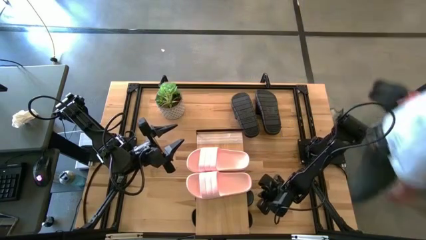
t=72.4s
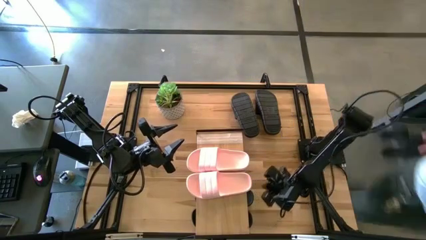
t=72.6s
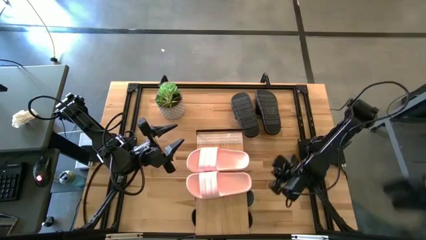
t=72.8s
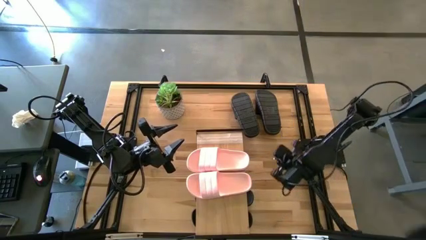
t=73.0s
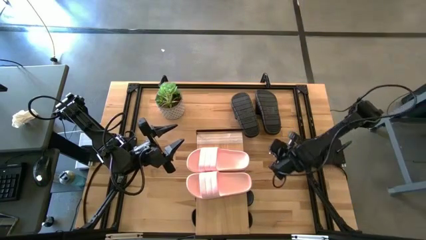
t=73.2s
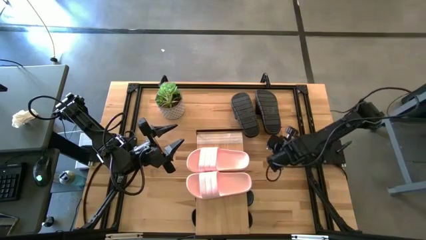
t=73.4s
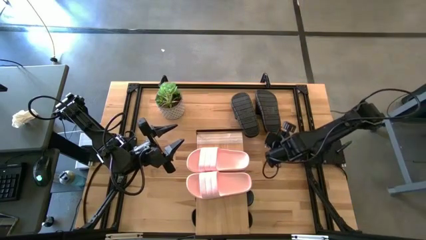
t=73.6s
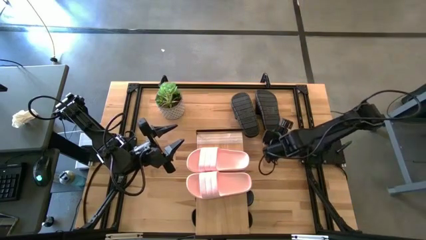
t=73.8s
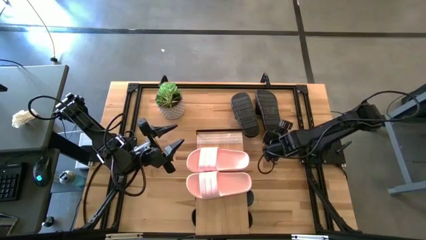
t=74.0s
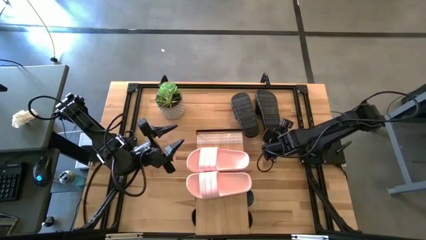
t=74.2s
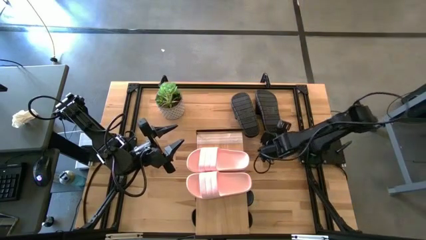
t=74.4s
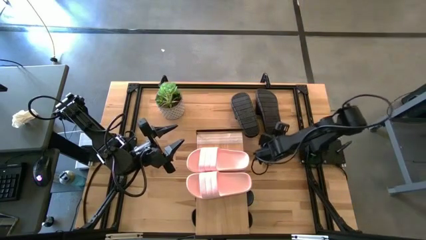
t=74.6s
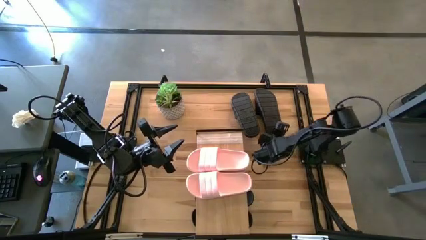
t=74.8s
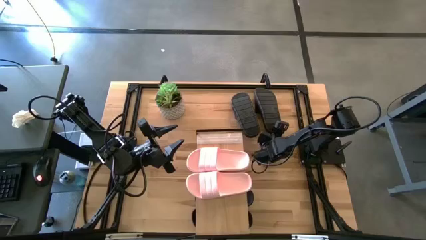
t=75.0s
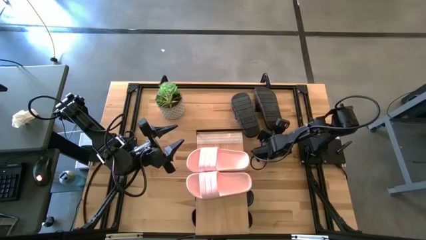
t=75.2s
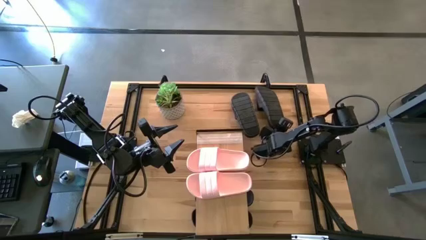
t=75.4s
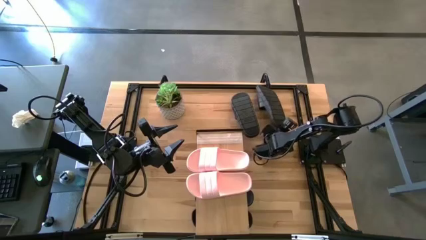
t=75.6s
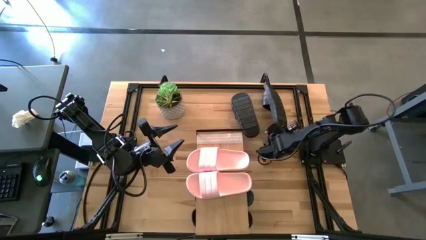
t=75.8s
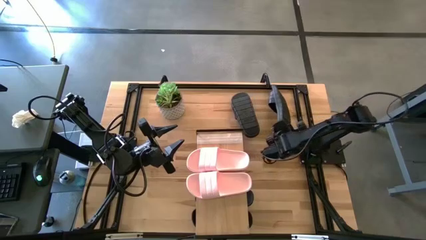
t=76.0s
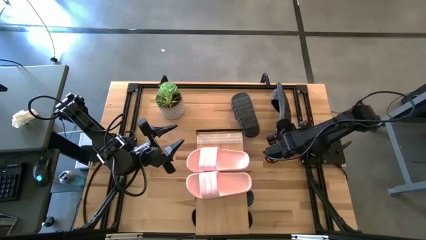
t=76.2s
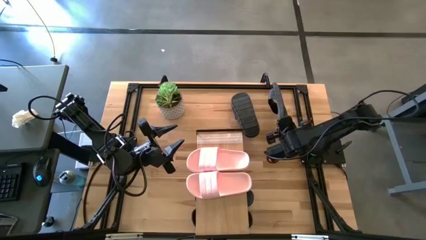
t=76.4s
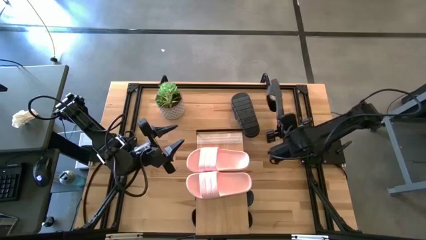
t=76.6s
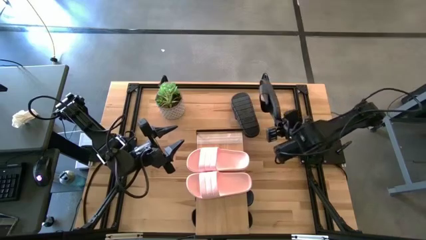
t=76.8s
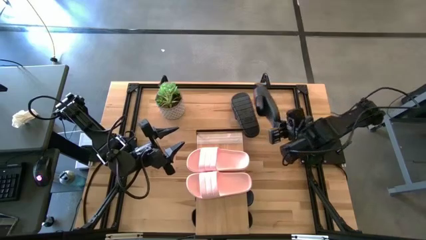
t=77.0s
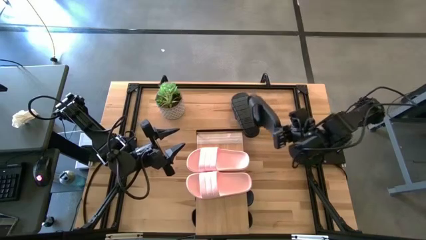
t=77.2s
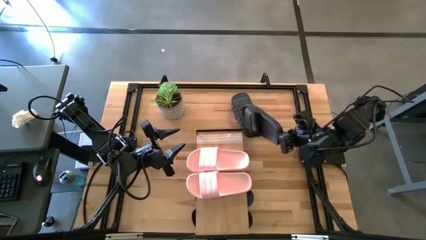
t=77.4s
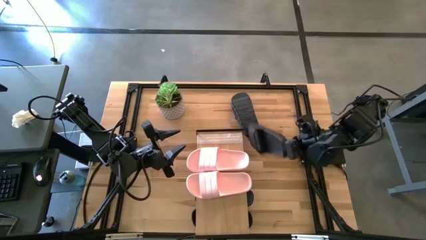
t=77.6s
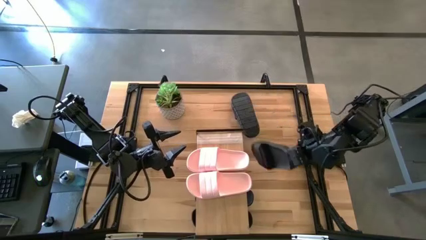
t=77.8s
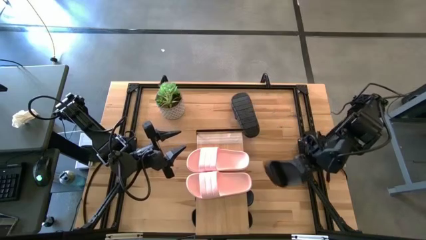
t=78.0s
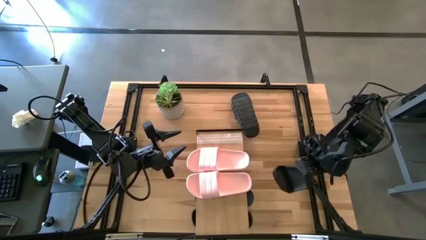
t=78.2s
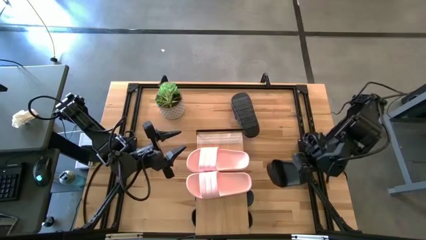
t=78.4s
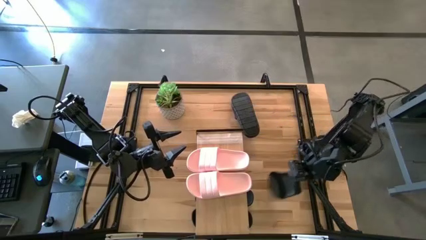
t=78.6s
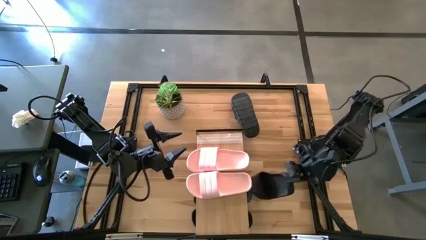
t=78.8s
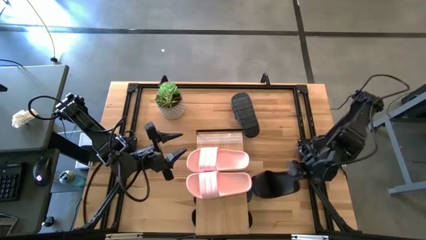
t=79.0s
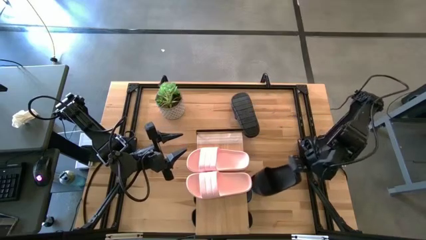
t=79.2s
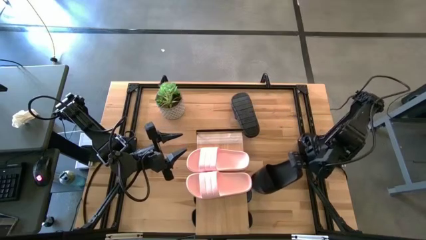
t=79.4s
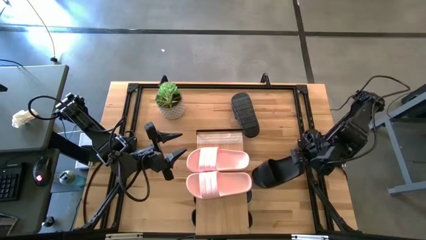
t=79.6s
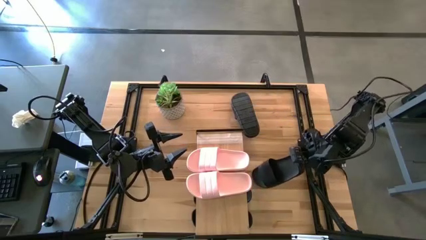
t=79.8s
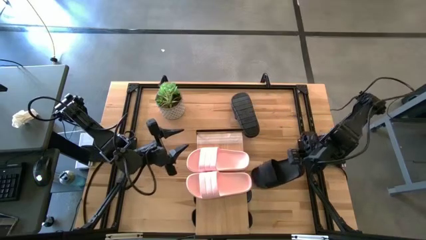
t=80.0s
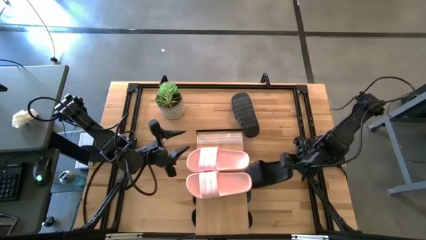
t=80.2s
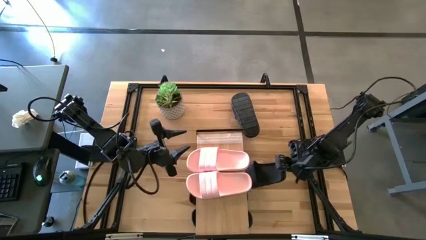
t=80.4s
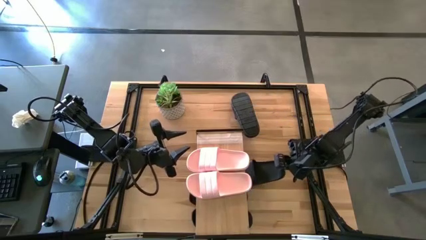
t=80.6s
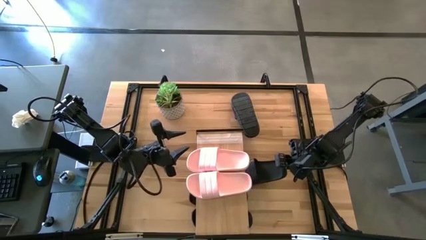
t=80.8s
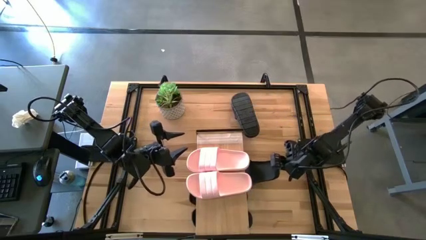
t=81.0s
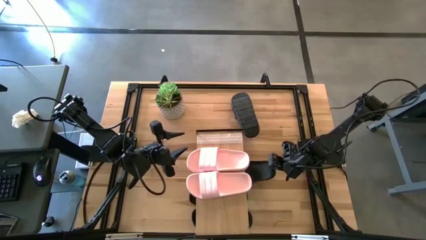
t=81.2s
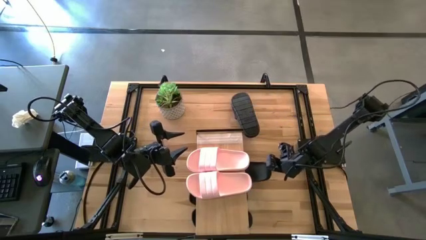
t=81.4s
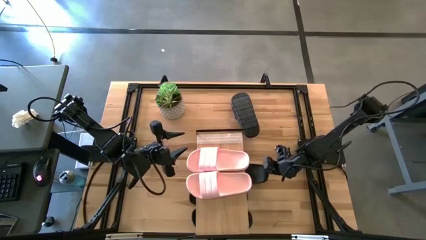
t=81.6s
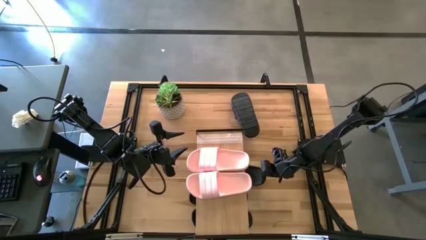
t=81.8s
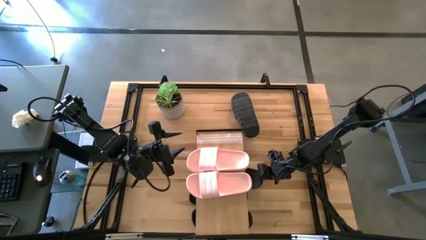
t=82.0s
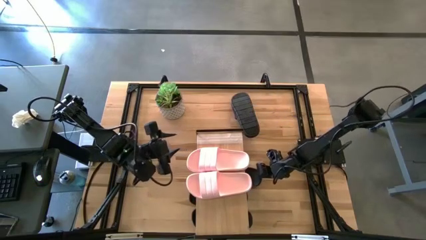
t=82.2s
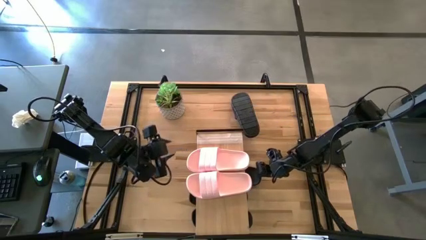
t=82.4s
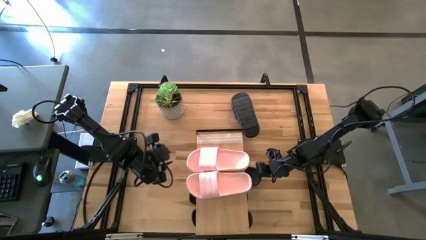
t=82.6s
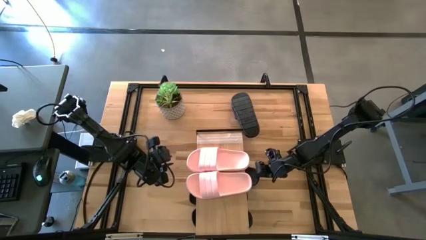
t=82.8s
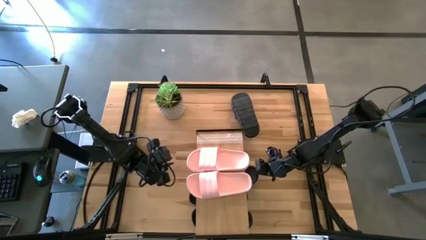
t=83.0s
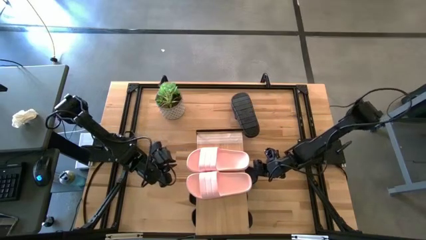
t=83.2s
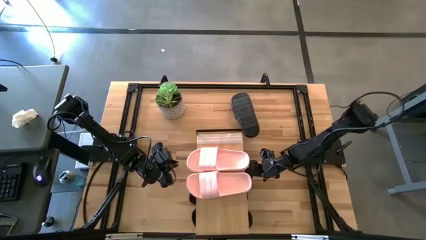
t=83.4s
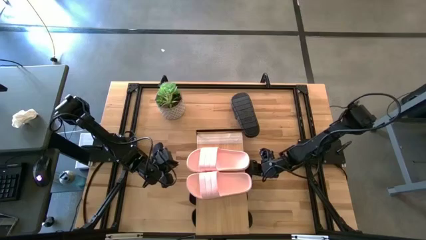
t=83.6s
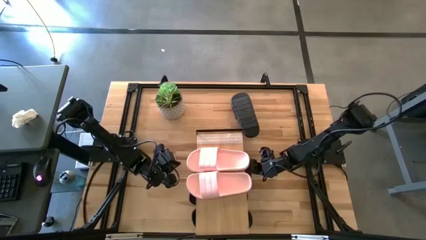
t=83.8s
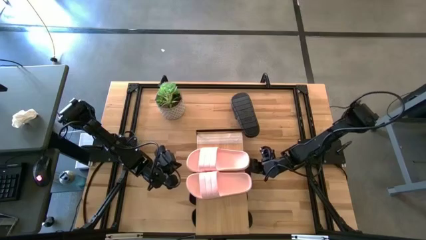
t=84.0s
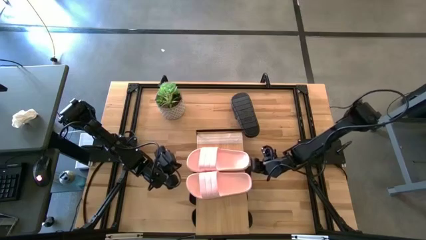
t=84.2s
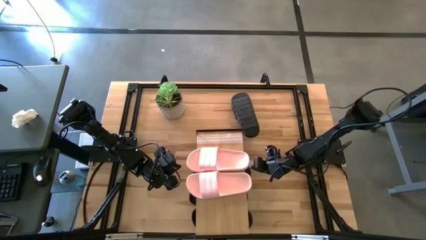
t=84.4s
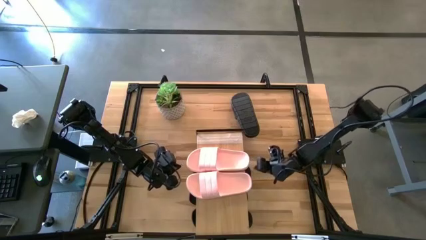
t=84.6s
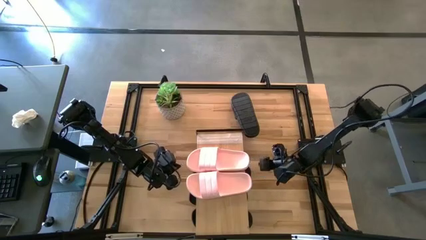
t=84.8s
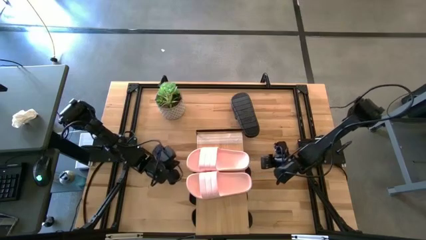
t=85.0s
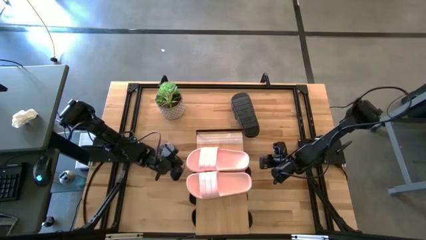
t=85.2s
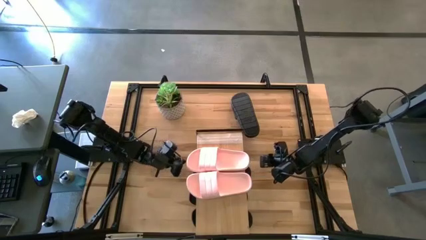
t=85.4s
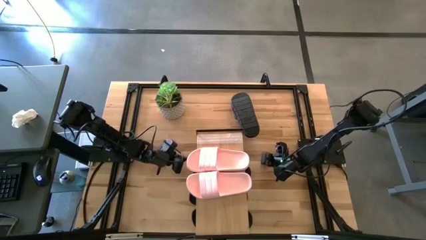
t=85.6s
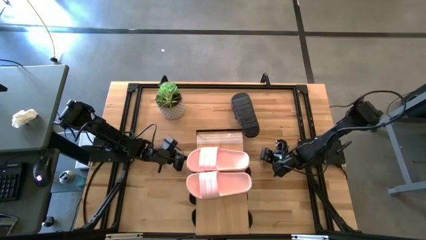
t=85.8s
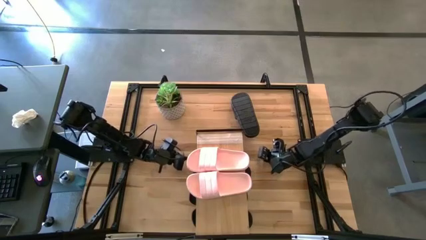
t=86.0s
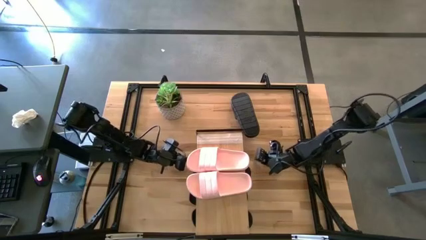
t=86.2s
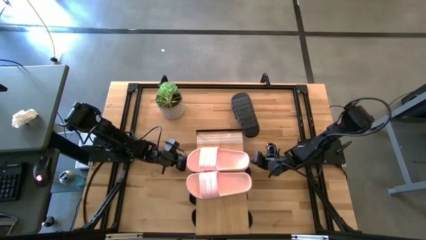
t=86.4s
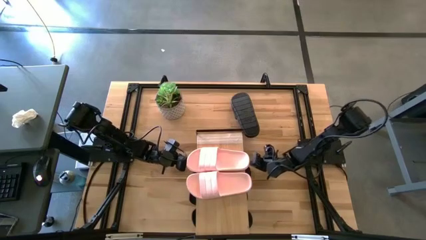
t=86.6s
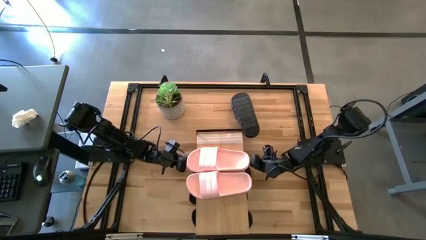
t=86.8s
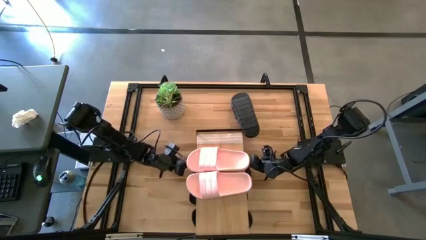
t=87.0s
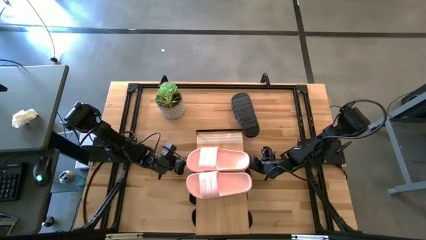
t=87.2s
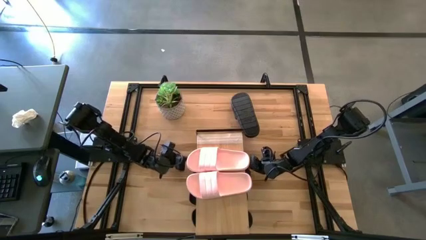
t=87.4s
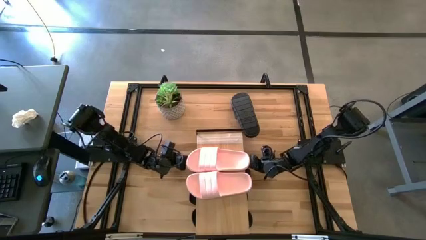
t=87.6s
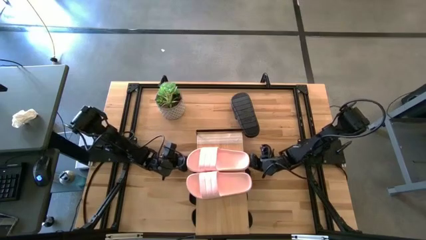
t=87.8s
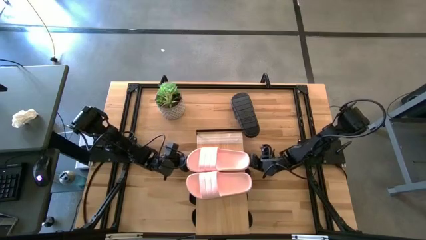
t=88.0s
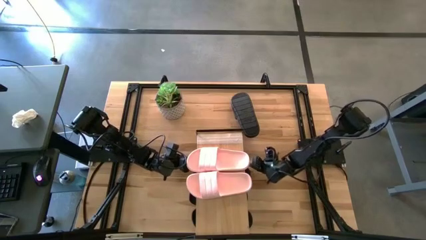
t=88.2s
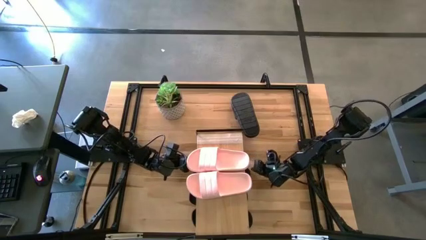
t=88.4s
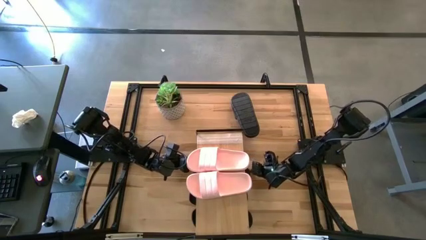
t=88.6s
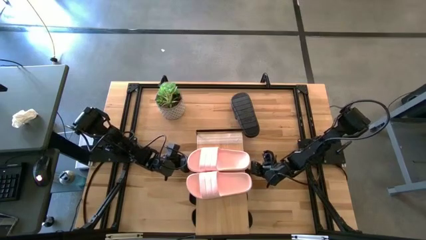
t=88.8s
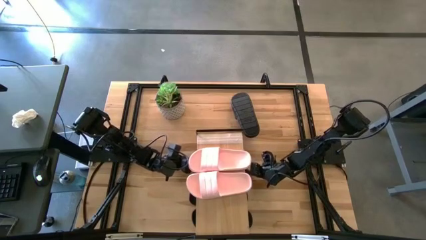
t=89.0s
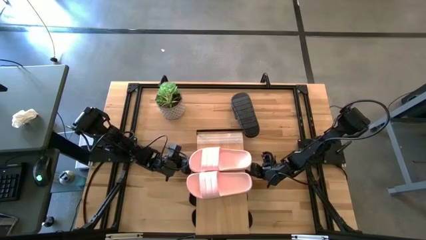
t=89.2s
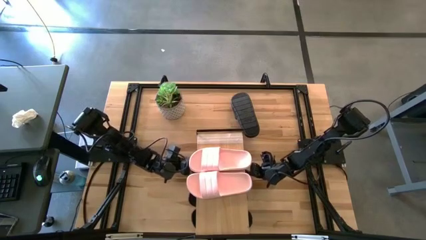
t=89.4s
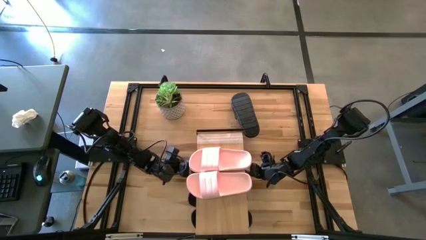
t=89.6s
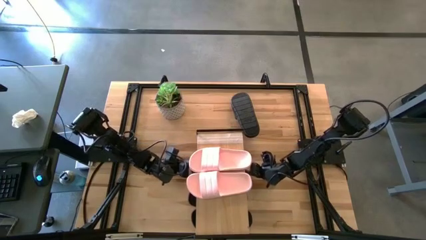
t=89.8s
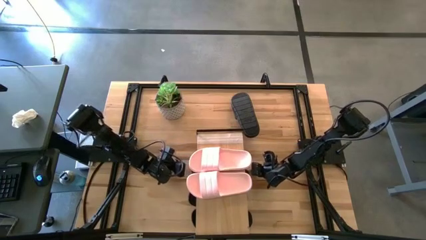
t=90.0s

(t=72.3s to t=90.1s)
Task: Pick and place slides into the shelf
Put the black slipper under the shelf
